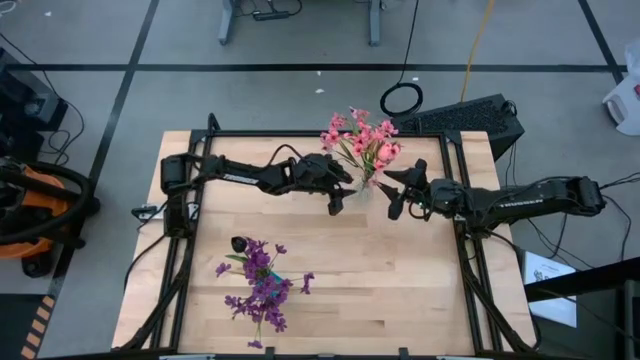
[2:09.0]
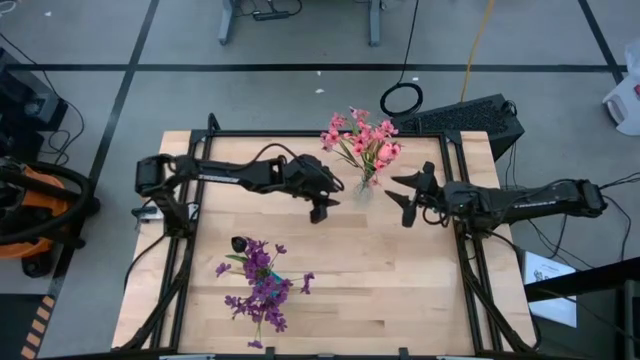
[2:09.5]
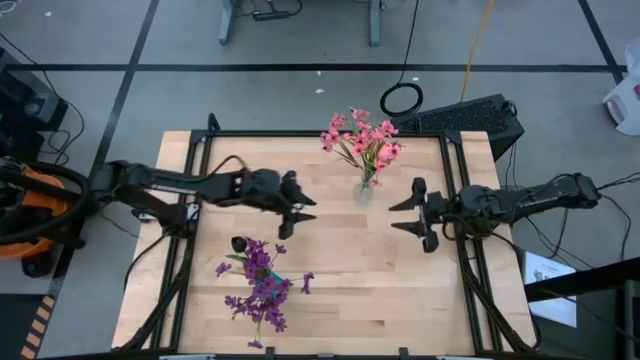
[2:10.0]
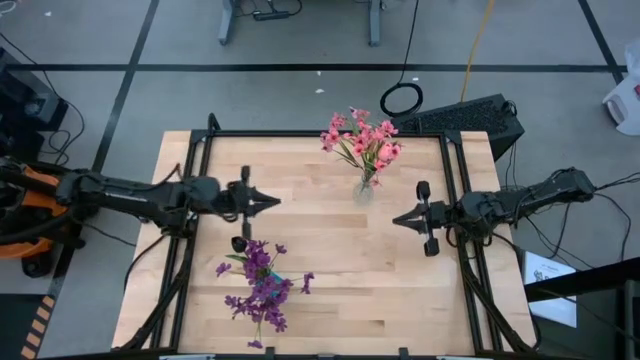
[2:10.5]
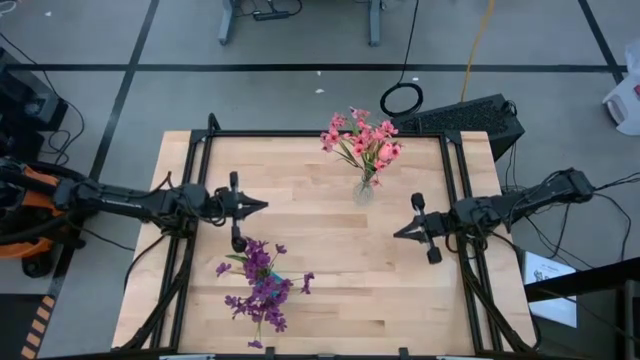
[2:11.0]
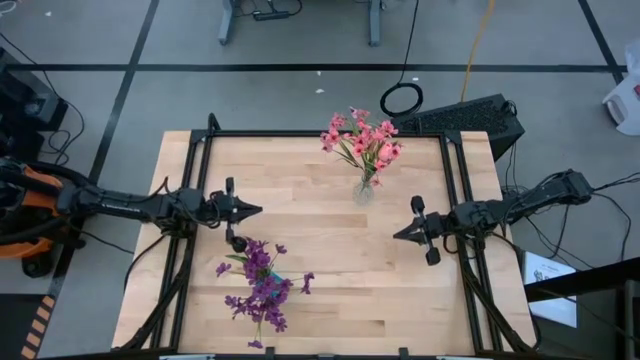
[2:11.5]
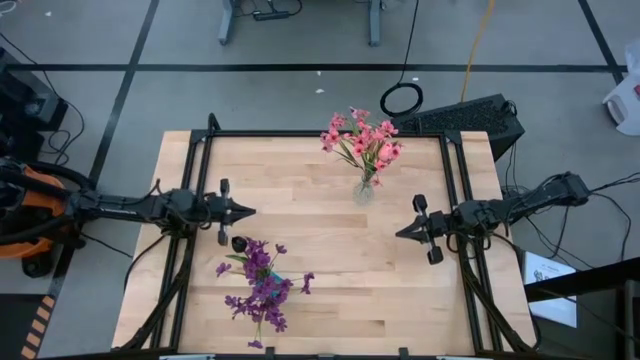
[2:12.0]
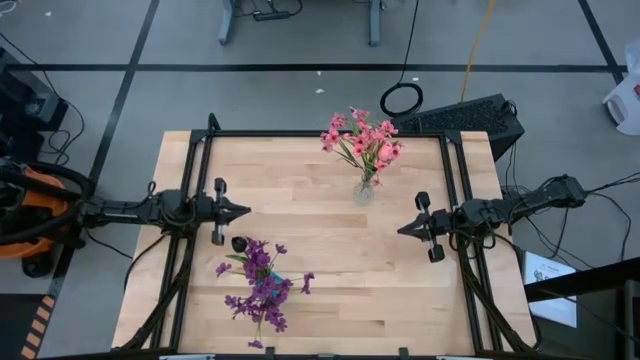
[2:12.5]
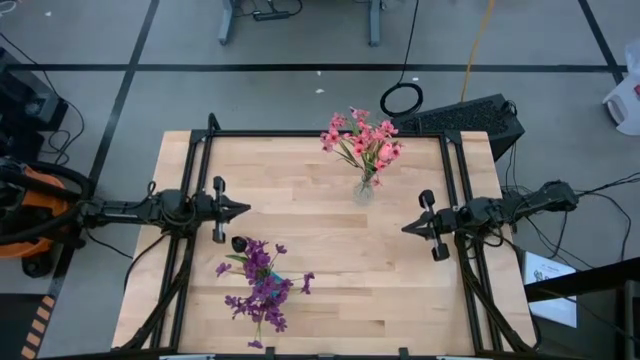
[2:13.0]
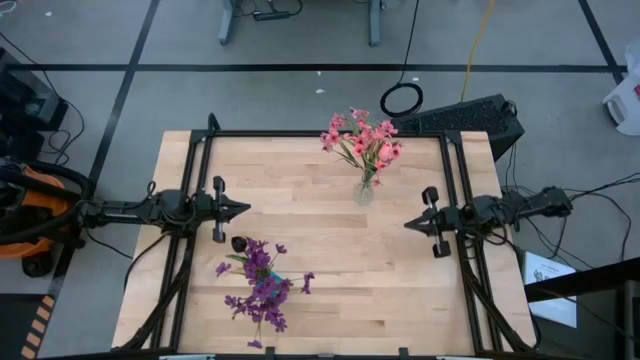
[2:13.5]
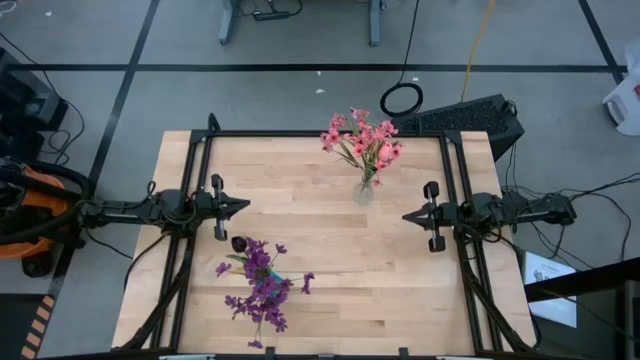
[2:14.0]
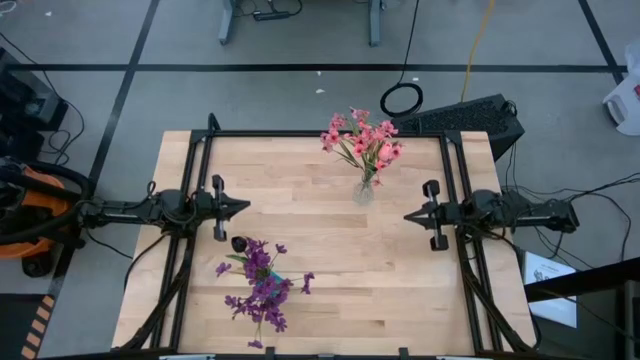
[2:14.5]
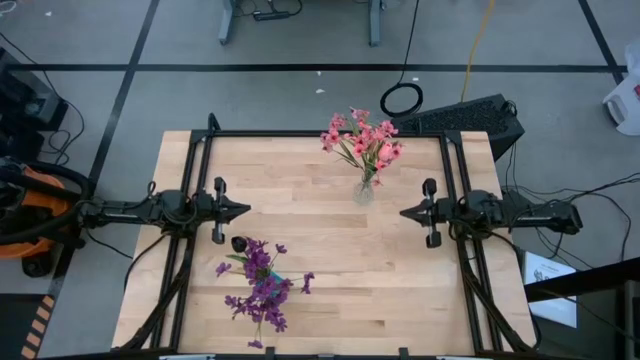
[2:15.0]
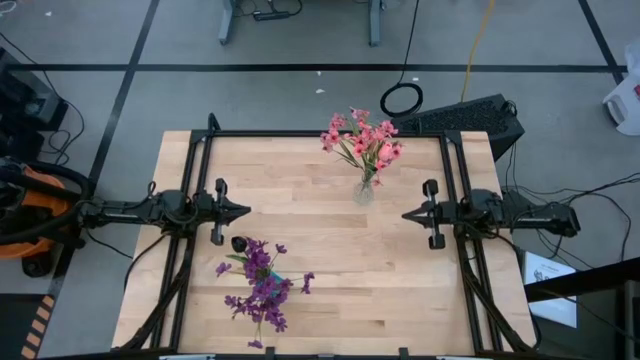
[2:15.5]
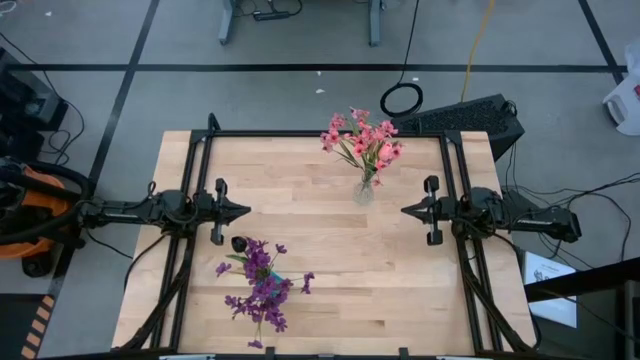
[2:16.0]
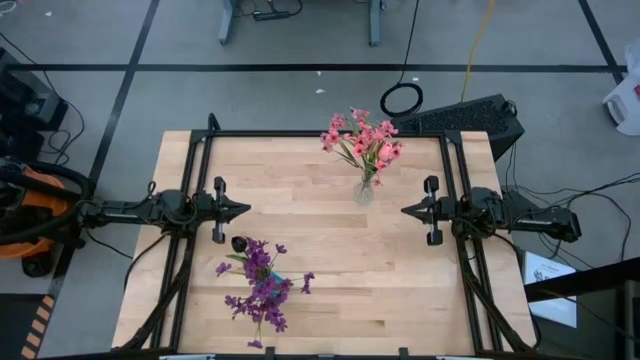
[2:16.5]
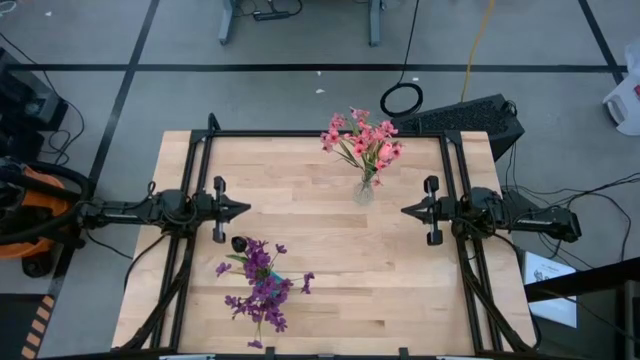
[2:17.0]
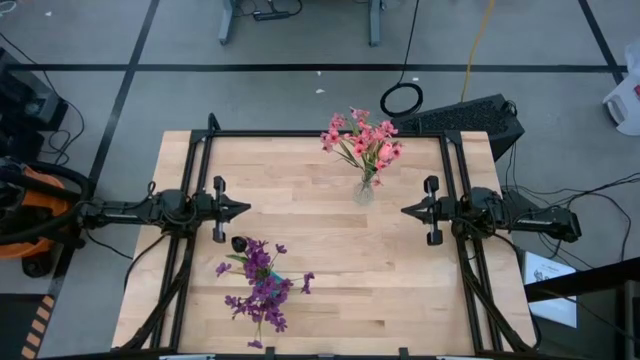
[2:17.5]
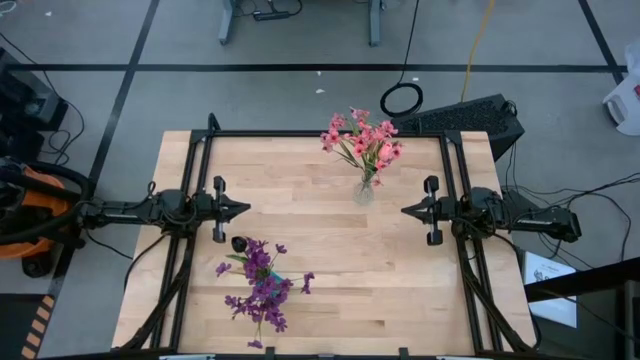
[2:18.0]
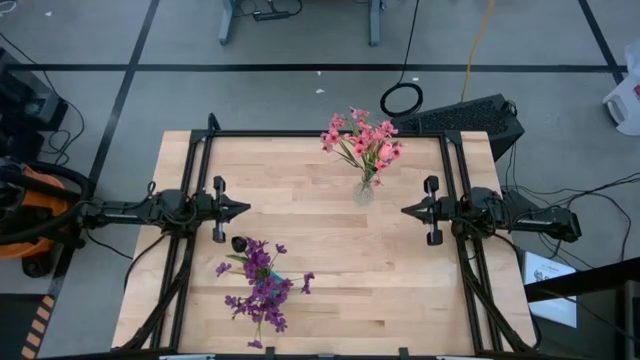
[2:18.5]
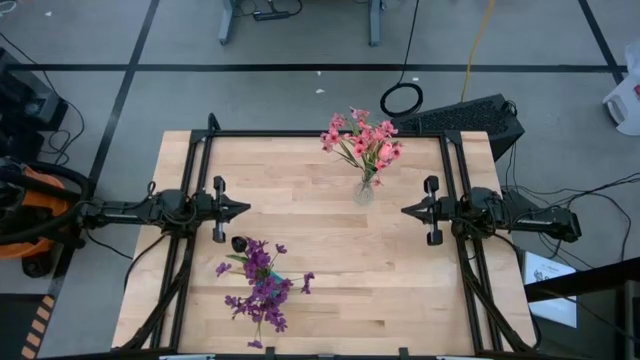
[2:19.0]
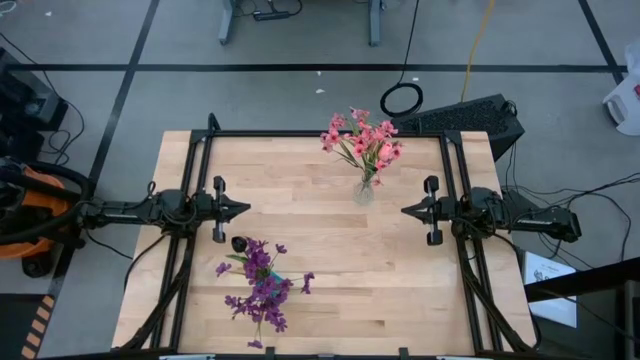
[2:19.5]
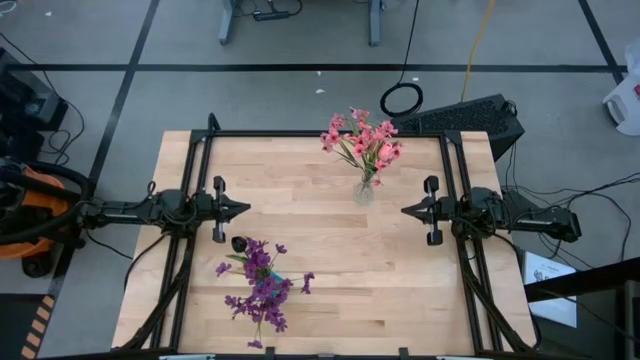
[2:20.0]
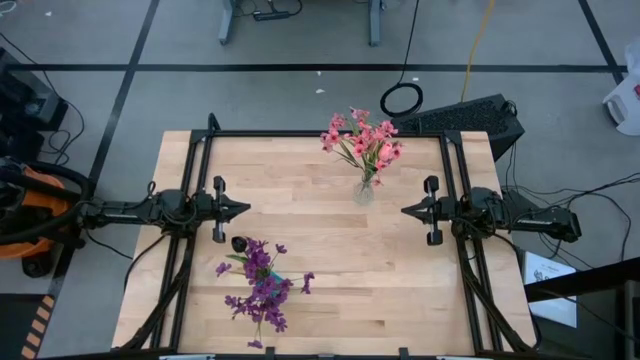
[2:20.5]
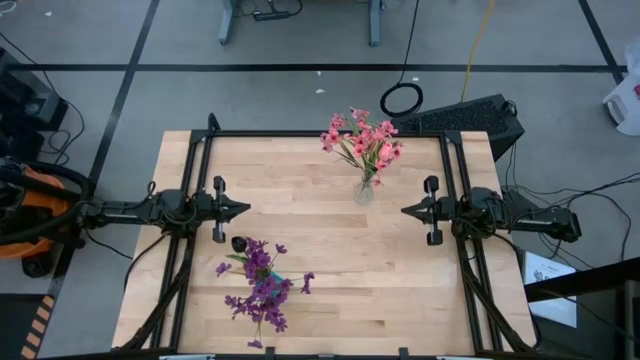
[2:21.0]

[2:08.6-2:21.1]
Task: Sort flowers into vase by color
Return to Home Position

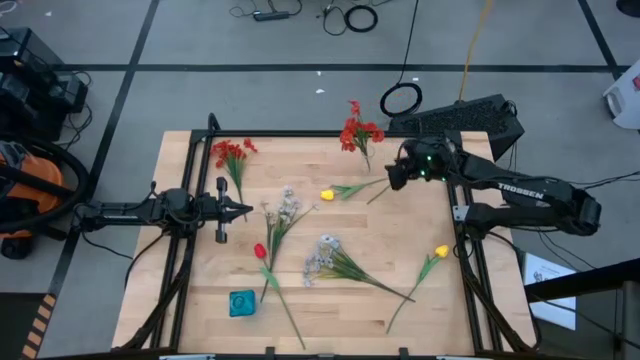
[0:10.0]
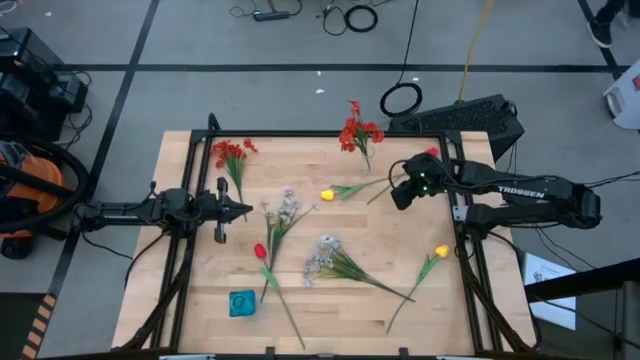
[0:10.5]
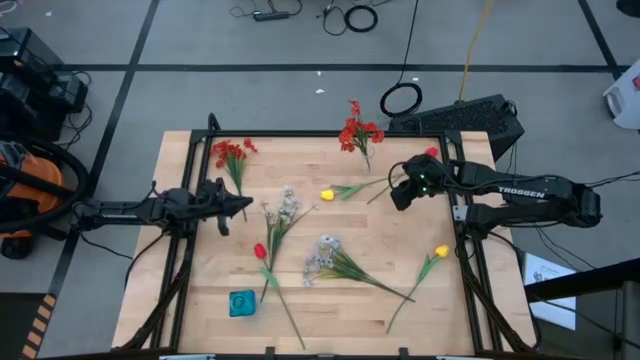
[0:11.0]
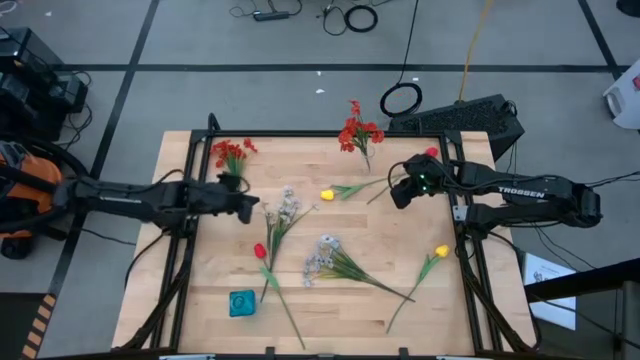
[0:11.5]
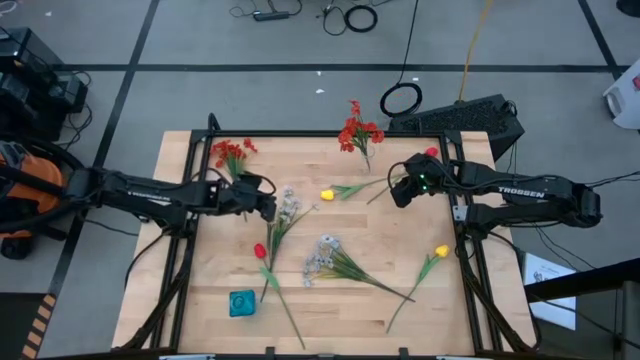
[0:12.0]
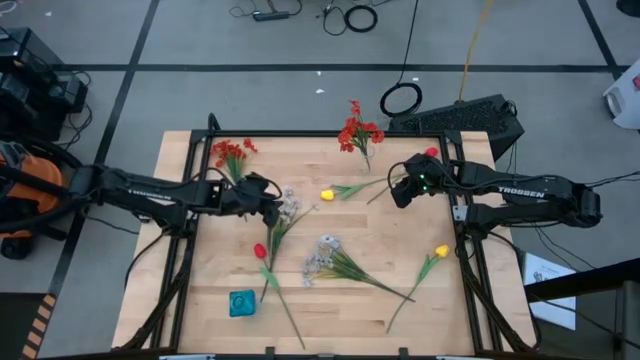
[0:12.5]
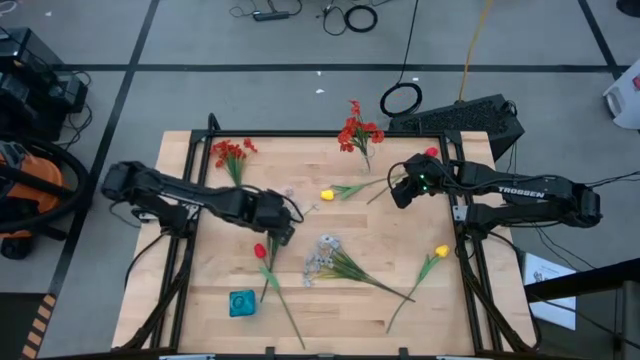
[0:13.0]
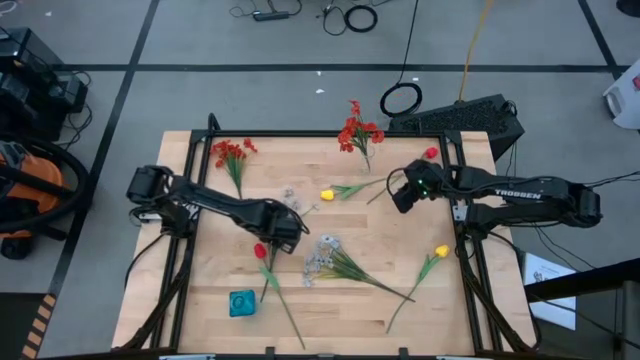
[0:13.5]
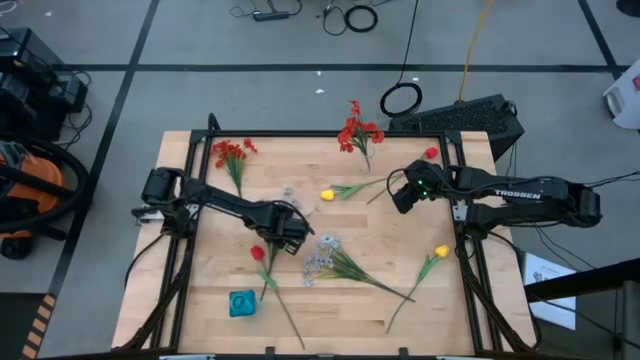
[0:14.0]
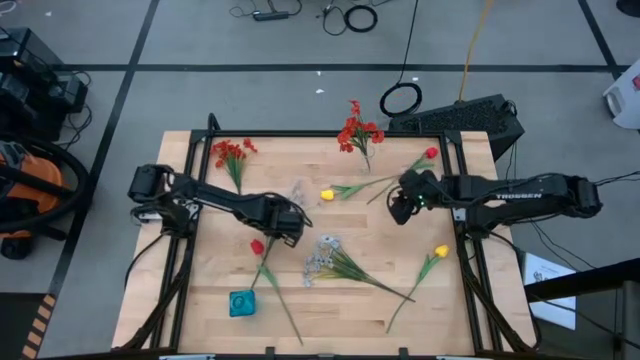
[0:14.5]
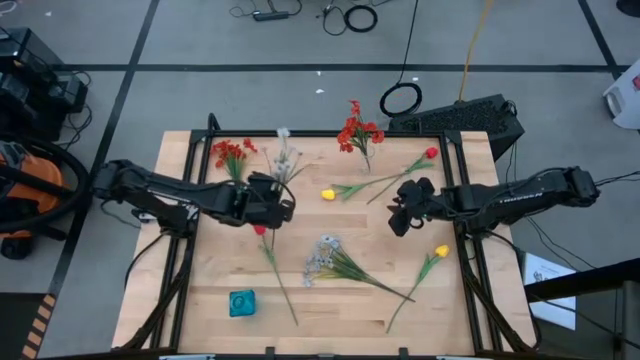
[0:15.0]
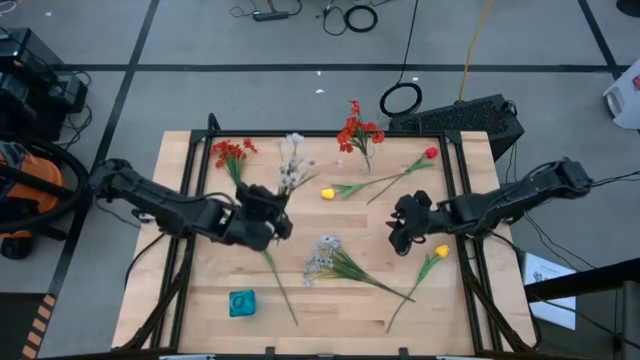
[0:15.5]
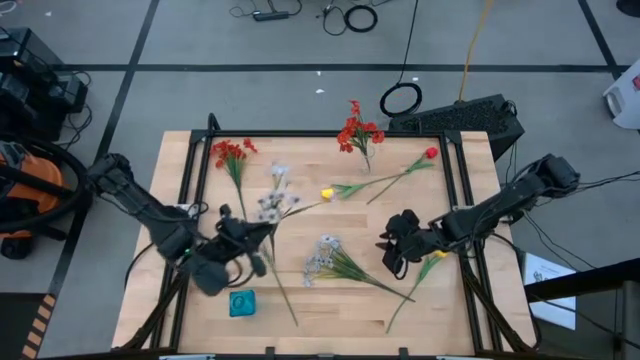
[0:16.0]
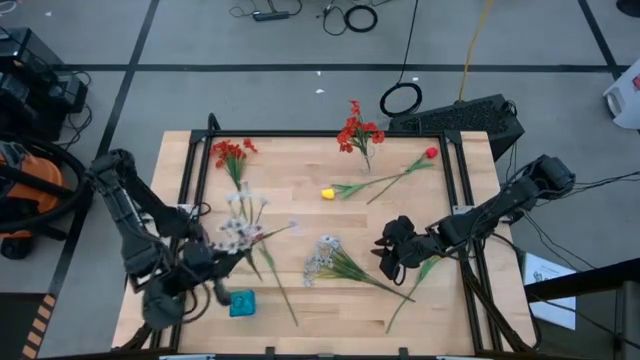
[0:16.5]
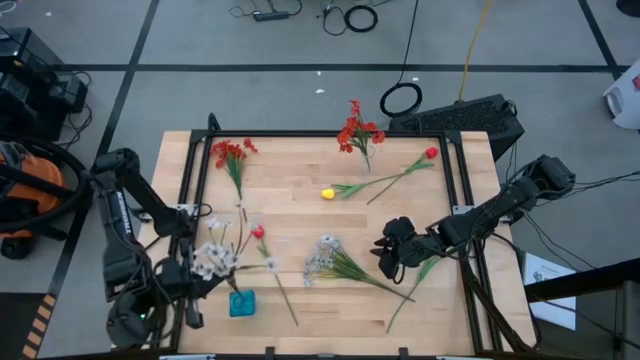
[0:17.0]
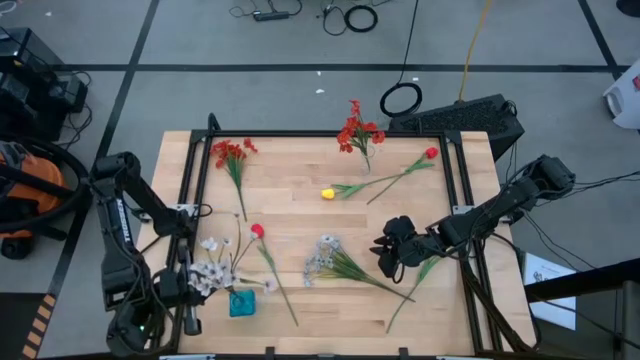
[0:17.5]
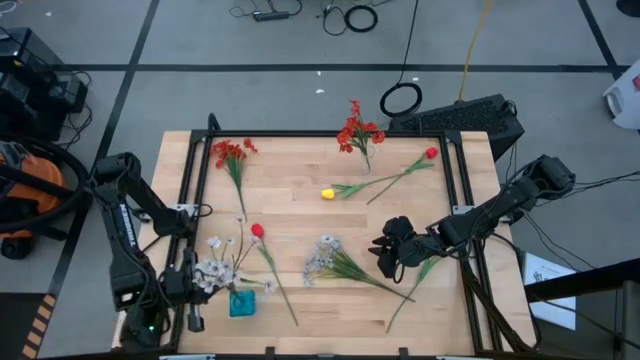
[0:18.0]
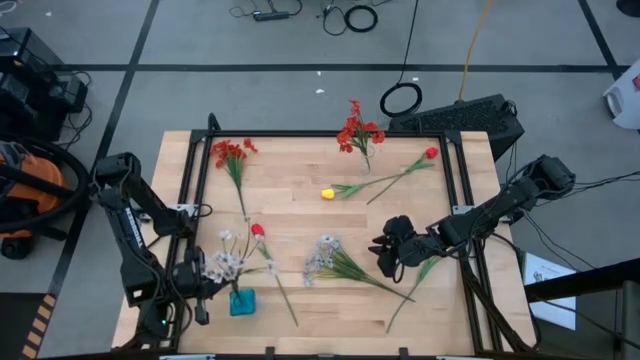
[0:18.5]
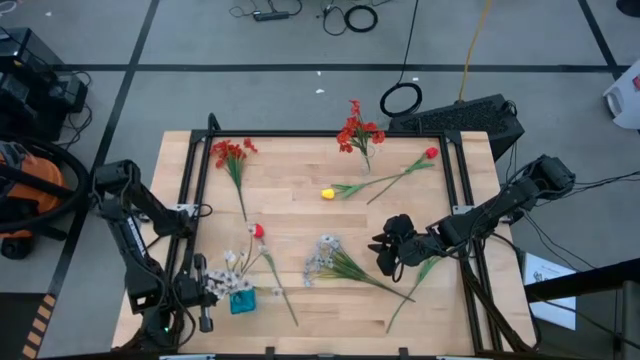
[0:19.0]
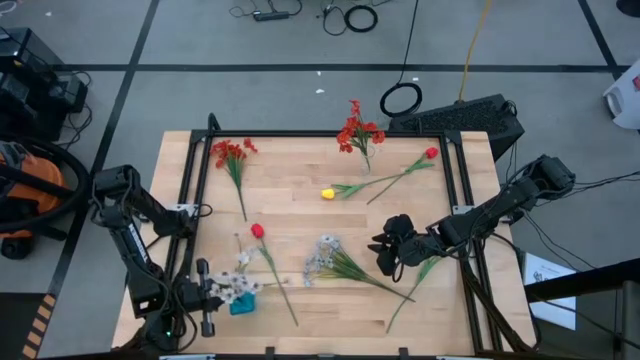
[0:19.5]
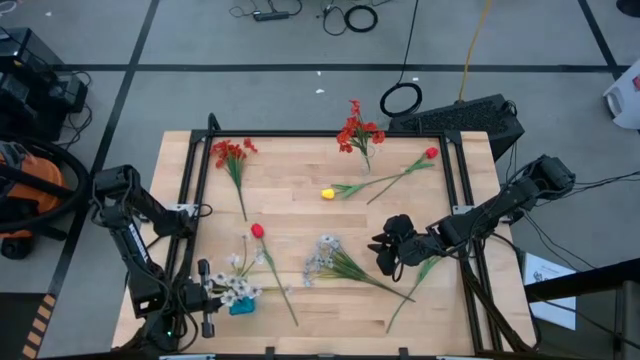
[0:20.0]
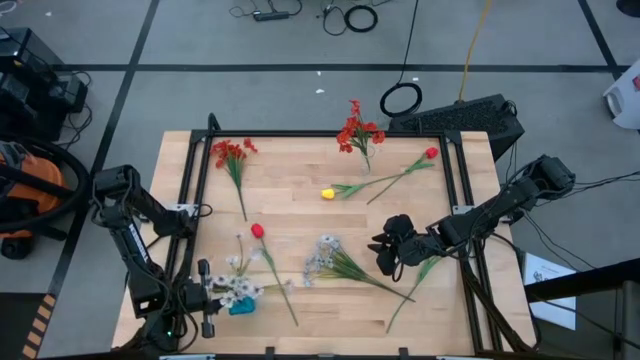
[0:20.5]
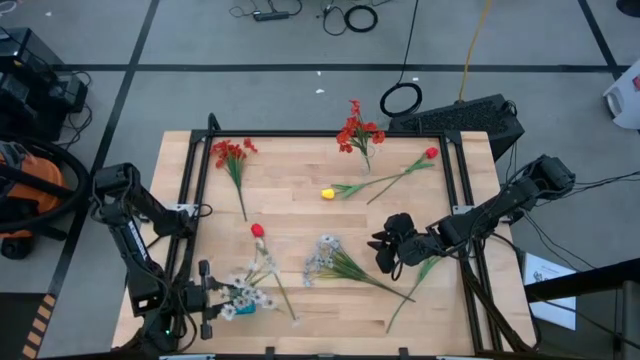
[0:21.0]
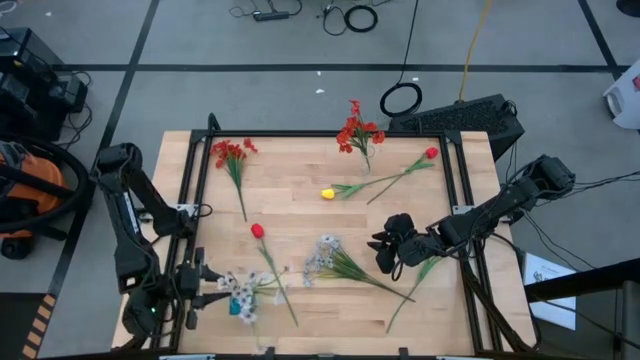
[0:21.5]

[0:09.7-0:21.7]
Task: Sort flowers into vase by color
Put the top white flowers into the blue flower vase
